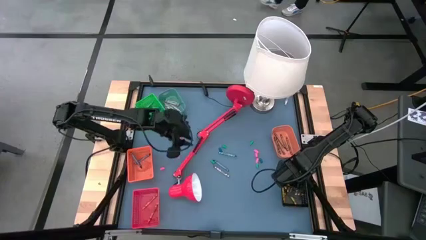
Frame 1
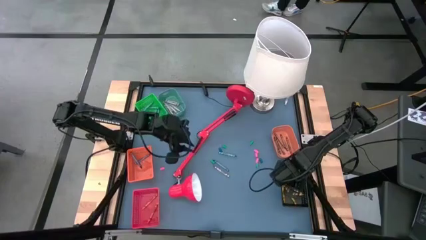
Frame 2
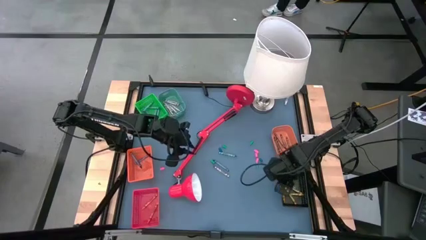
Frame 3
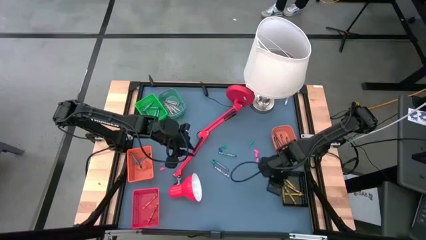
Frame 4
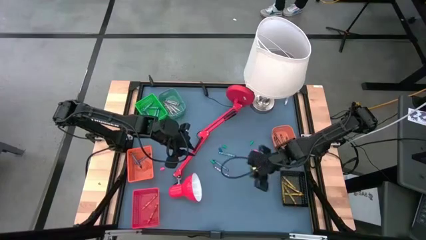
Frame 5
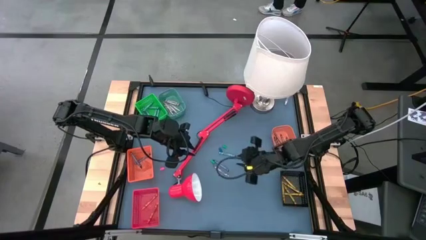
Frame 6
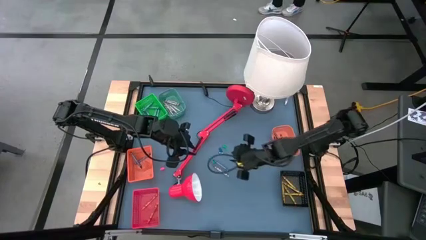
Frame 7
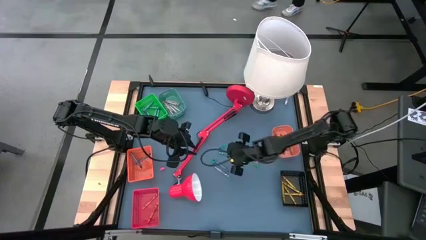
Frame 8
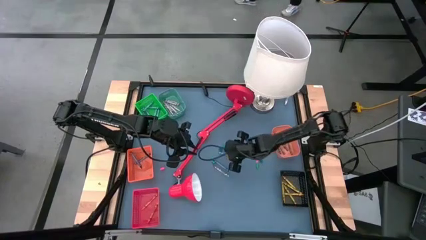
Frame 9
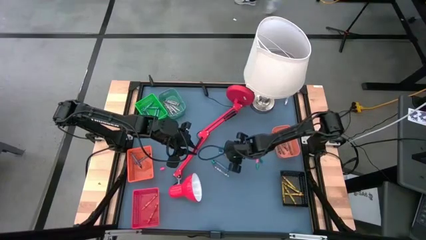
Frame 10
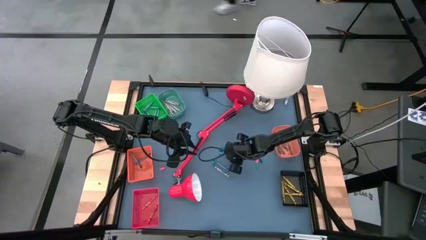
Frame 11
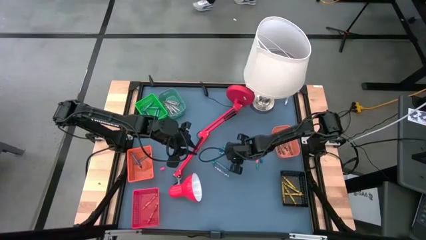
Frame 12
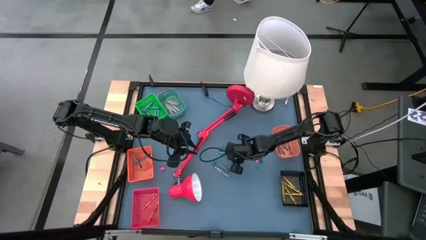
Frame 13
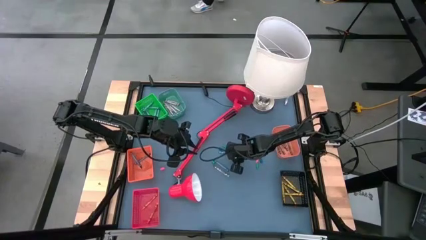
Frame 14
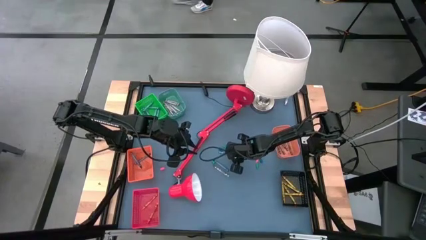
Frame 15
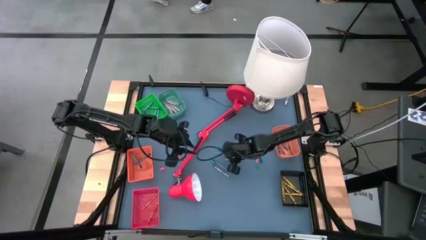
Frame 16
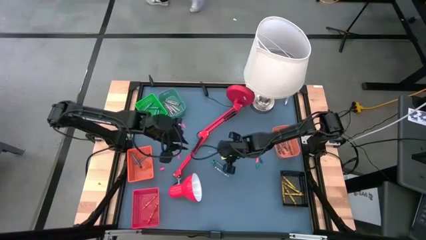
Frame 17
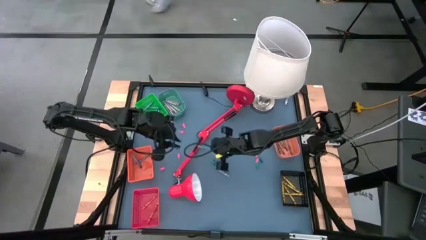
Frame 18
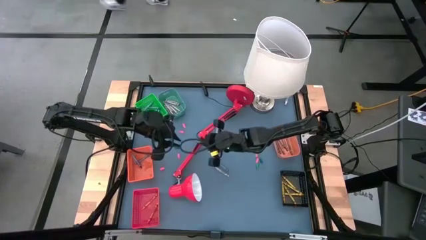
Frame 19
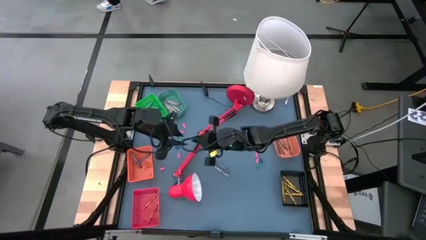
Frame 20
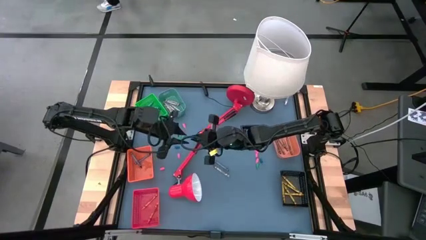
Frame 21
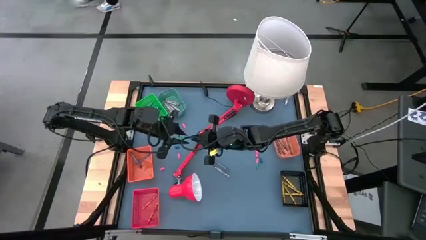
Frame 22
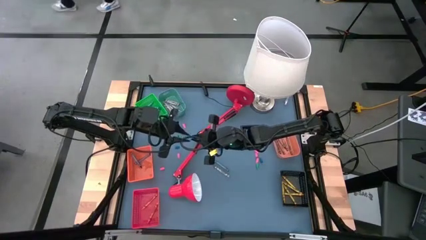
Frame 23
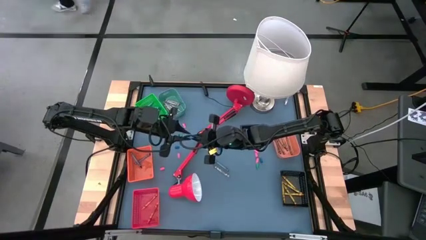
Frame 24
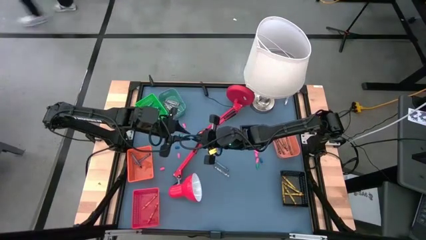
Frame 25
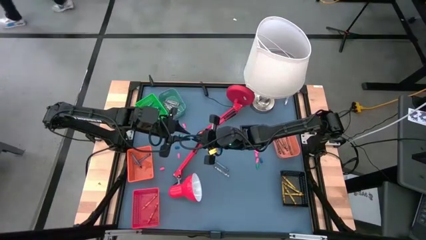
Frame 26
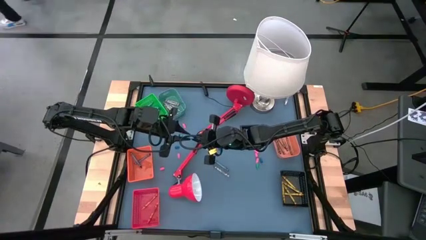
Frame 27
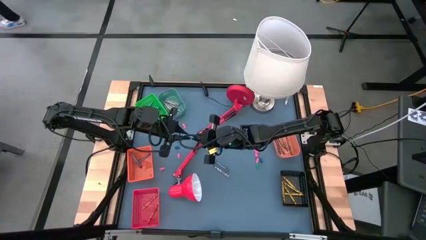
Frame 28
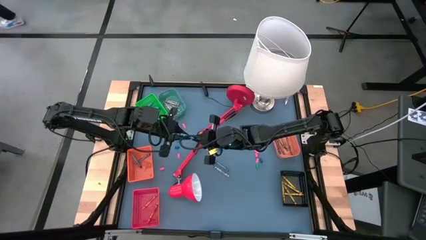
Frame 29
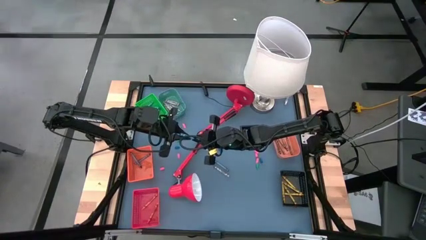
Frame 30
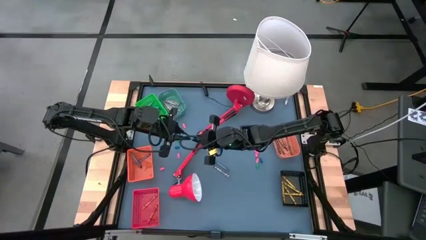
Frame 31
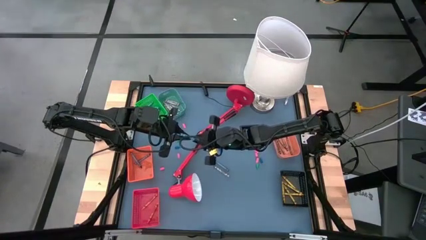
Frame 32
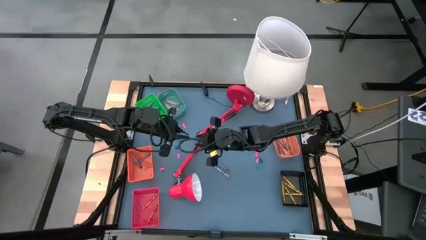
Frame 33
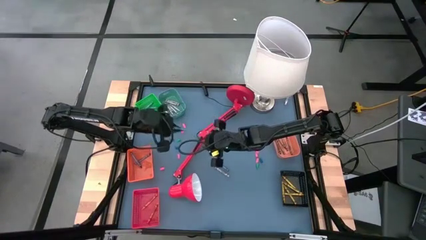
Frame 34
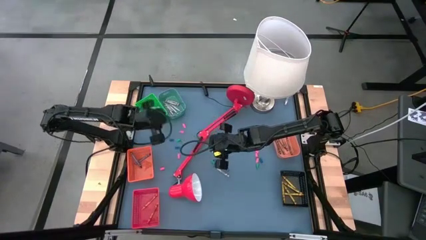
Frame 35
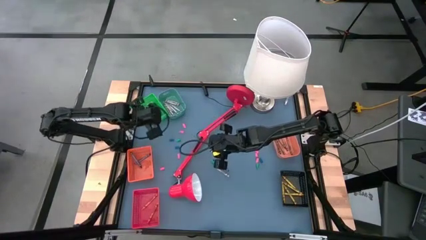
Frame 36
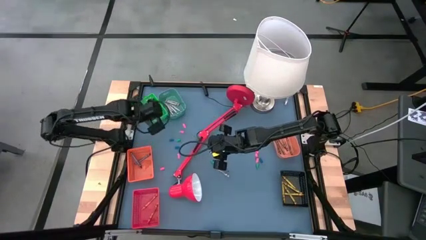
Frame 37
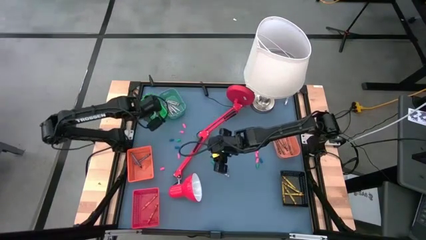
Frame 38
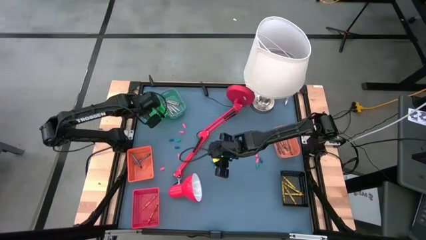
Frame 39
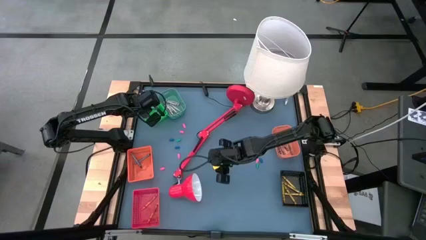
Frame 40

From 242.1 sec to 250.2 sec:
Task: Sort crayons
Put the green crayon into the green bin

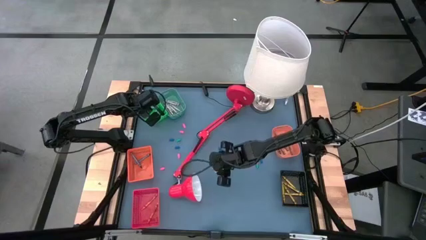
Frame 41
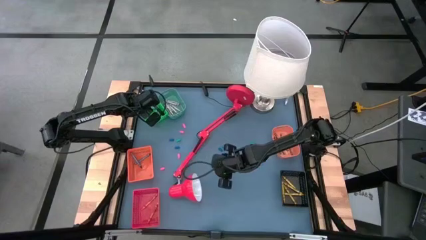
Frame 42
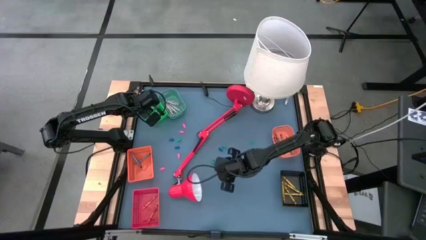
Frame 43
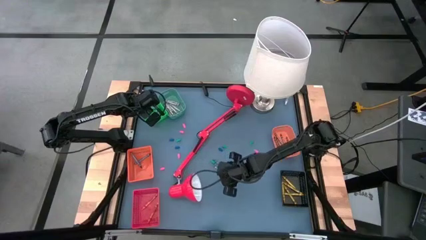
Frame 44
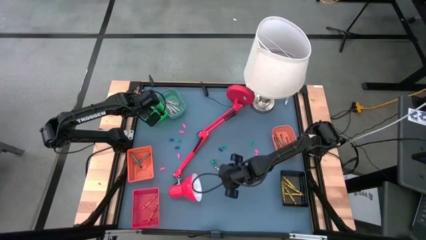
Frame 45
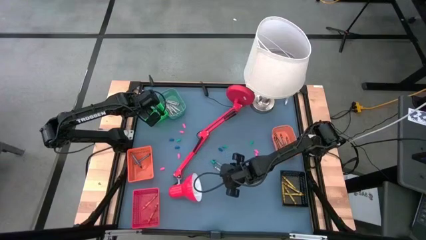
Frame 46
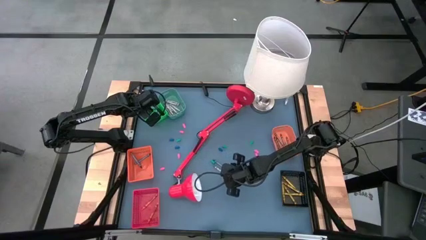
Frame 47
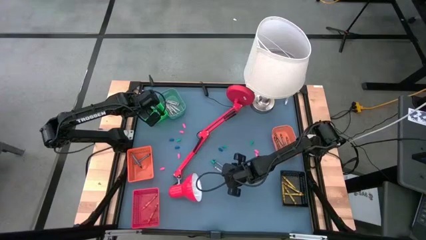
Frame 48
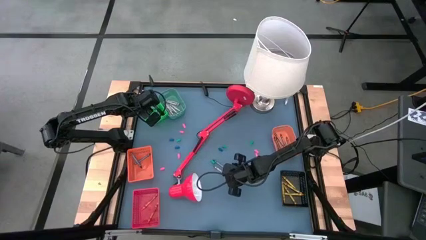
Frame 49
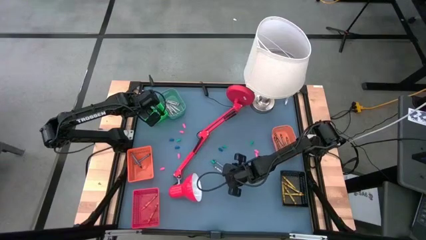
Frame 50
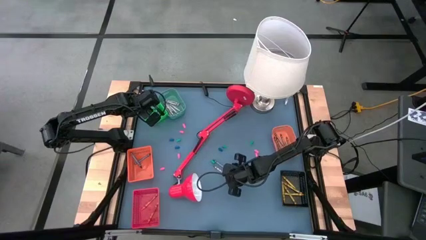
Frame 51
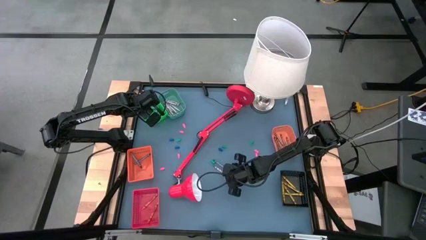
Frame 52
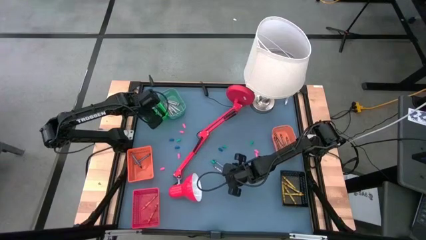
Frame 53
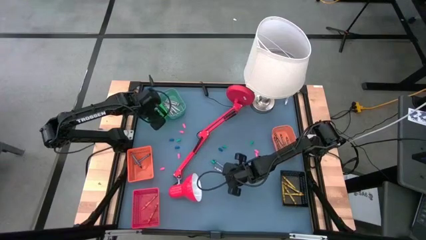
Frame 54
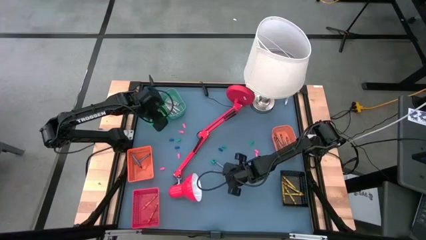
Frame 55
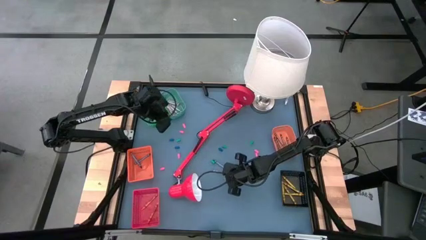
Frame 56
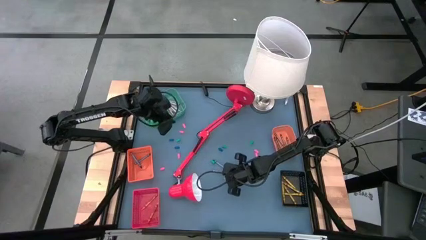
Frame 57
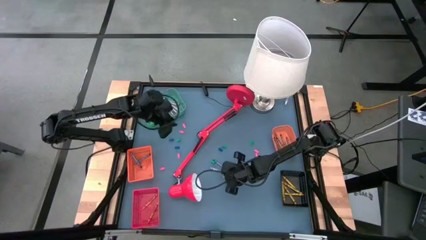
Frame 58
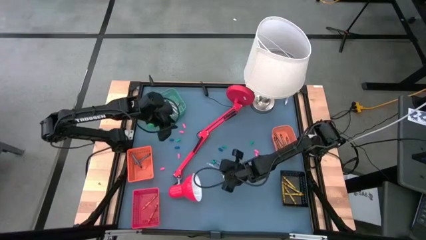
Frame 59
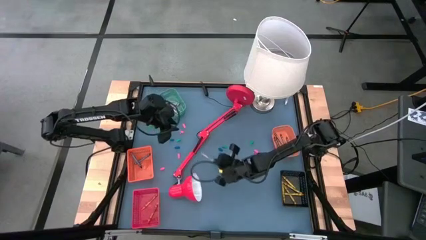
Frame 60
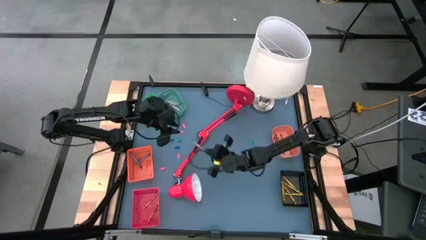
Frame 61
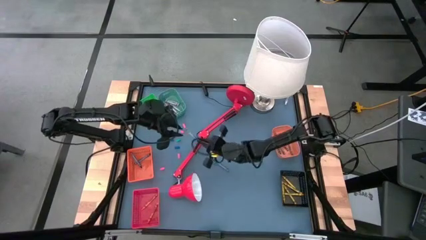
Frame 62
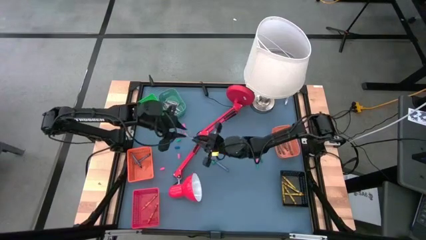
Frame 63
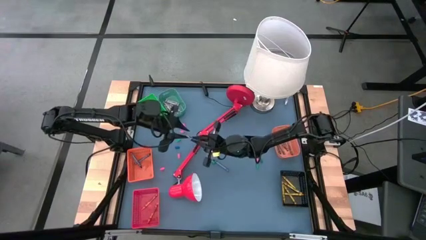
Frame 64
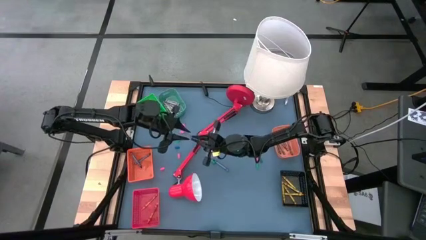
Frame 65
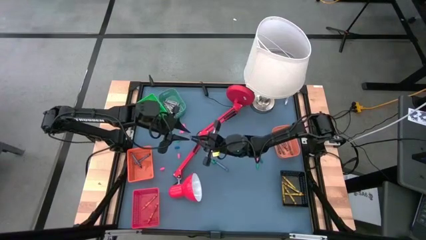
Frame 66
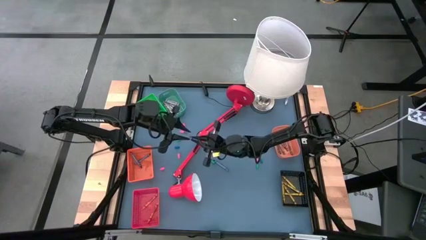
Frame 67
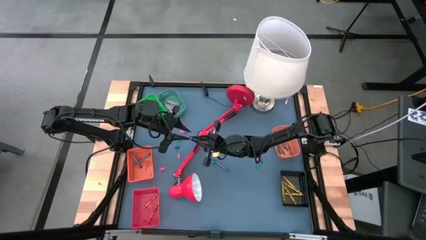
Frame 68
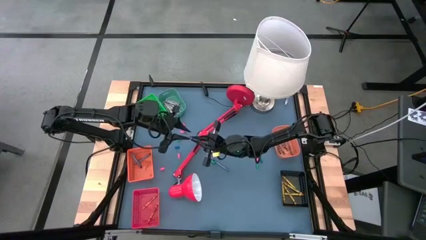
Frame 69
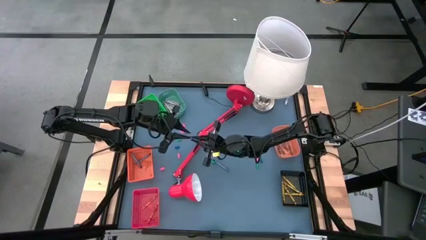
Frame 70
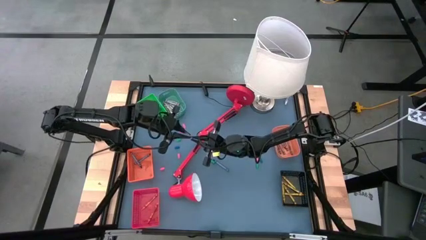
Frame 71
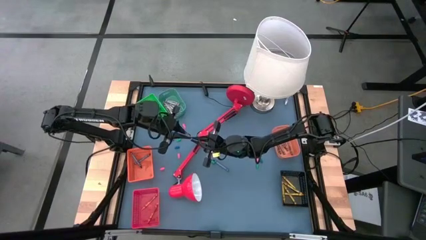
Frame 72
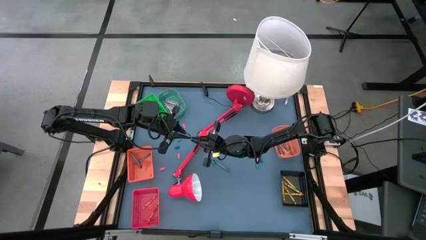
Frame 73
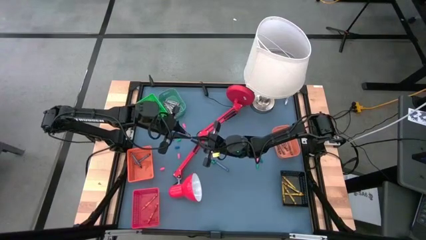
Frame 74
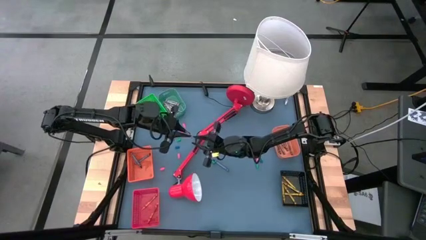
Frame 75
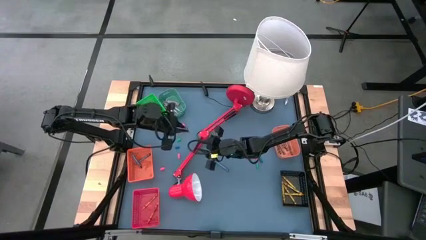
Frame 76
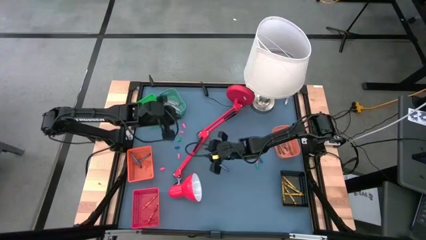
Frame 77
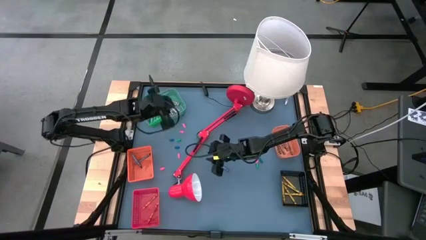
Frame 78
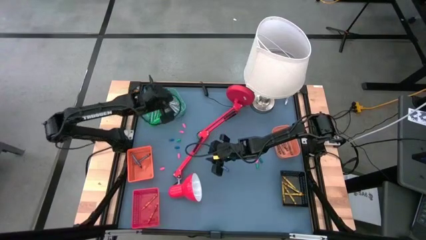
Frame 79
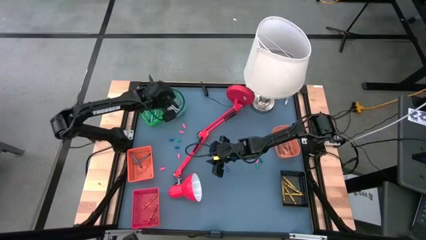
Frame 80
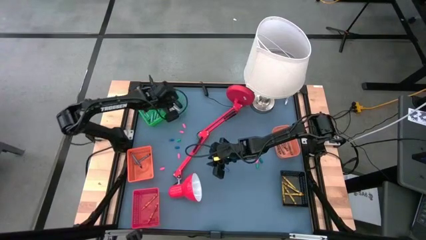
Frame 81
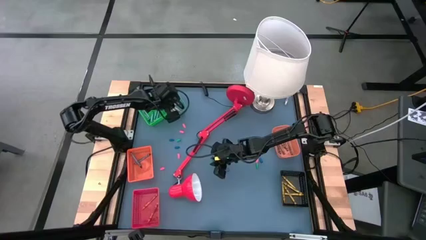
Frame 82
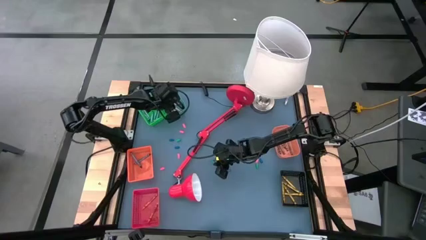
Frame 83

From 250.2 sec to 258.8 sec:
Put the gray crayon into the blue bin

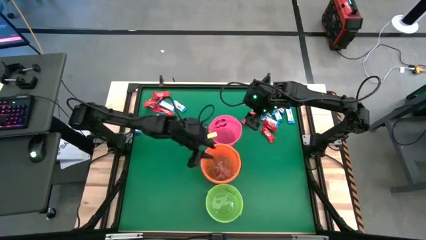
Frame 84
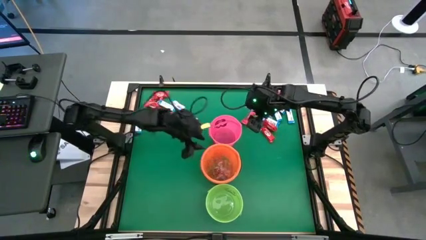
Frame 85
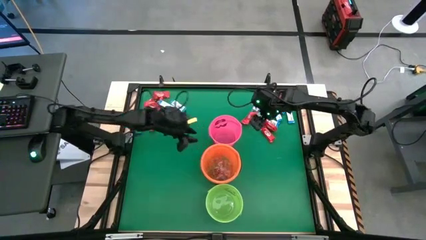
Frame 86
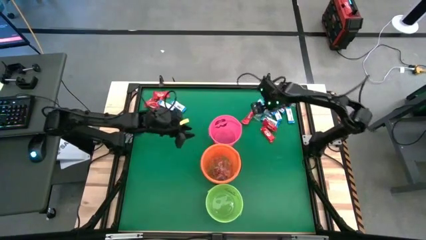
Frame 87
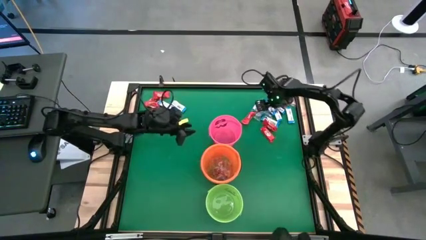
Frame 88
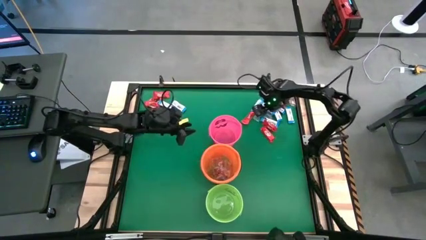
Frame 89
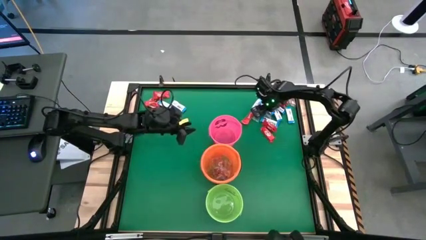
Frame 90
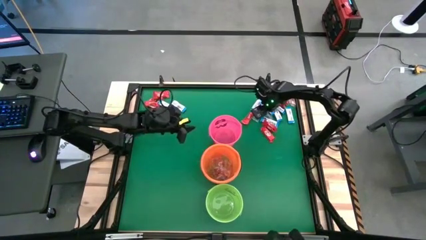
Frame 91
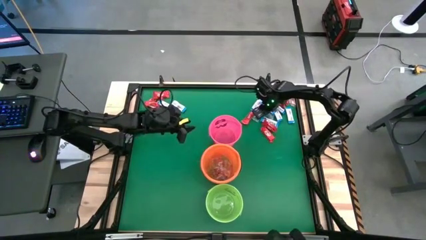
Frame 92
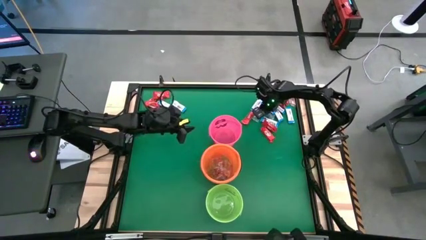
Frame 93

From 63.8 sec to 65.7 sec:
Task: Sort candy by brand, put in halloween buckets
Put the blue gummy into the orange bucket
